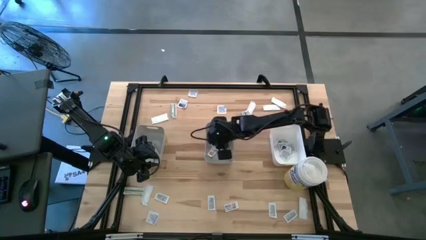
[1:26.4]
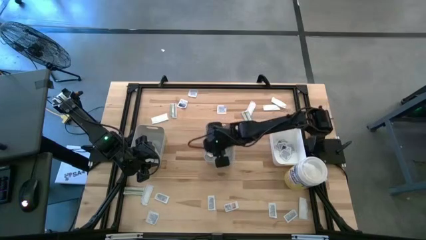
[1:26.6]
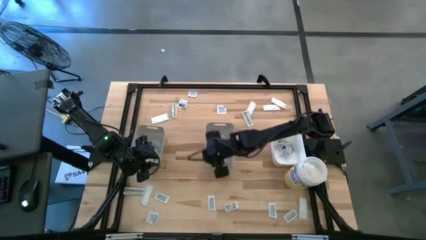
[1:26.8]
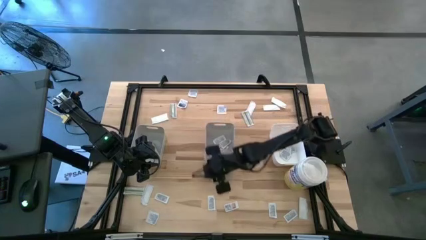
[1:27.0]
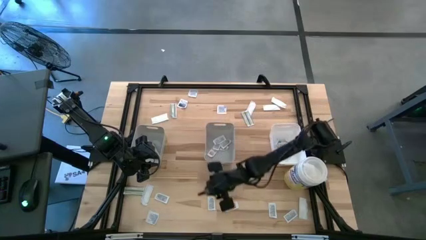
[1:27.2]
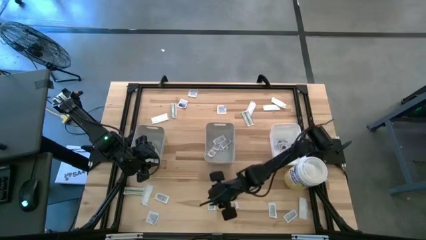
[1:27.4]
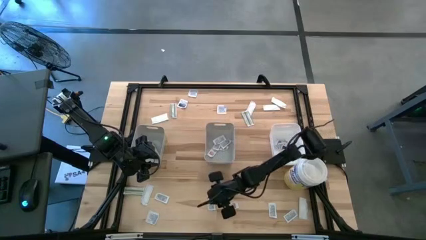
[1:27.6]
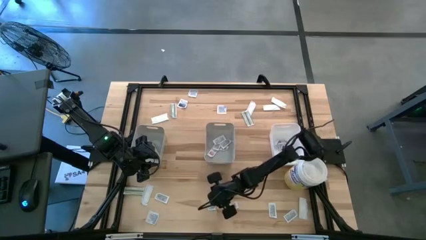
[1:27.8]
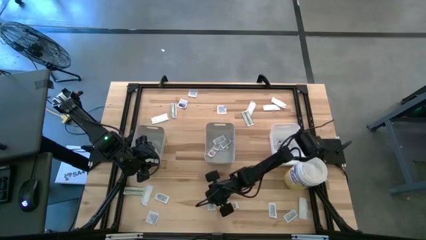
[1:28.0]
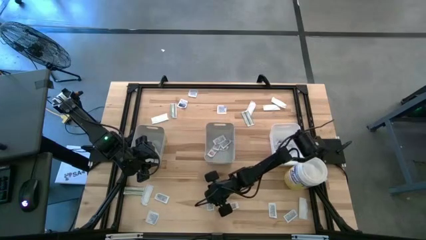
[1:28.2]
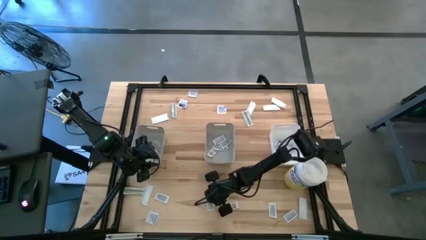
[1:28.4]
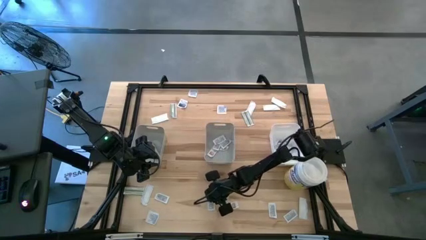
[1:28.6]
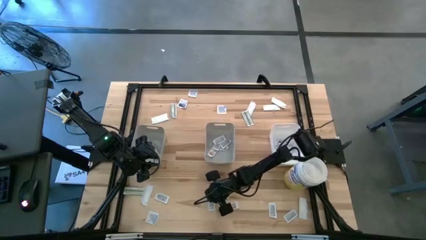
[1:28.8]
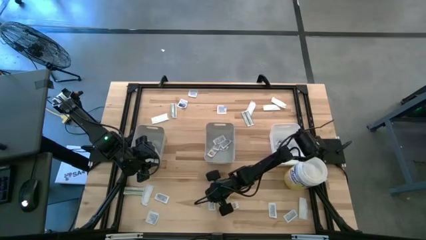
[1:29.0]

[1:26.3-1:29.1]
Task: Pick & Place First Aid Supplies
Put the ointment pack into the right gray bin

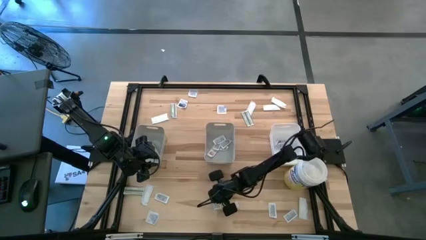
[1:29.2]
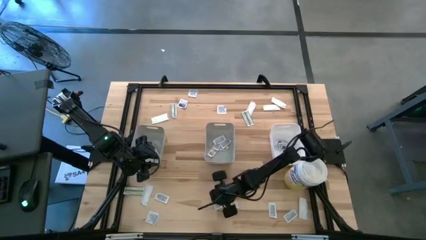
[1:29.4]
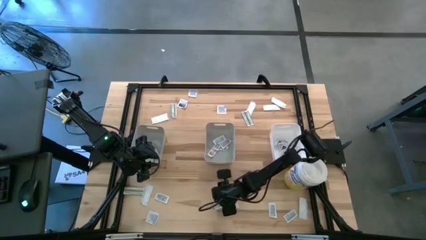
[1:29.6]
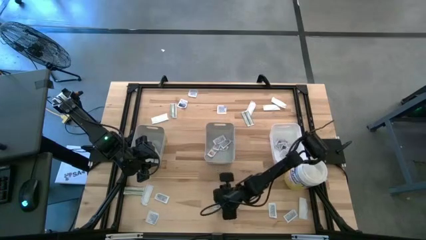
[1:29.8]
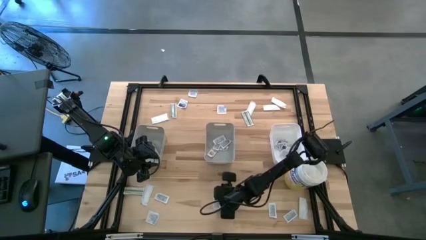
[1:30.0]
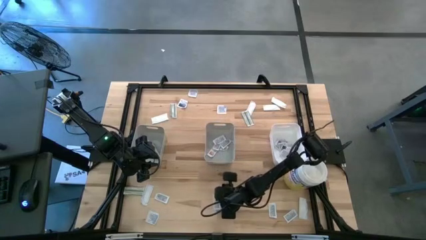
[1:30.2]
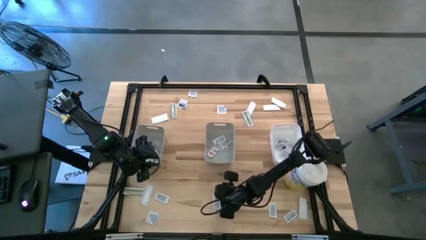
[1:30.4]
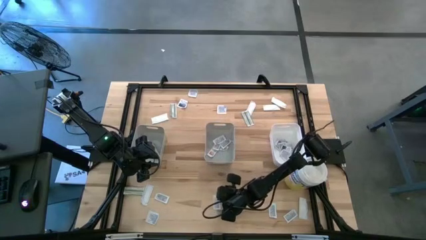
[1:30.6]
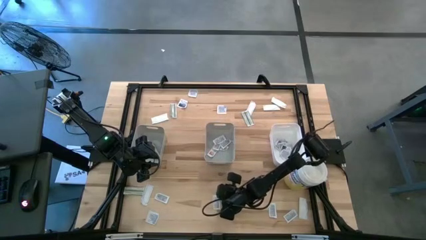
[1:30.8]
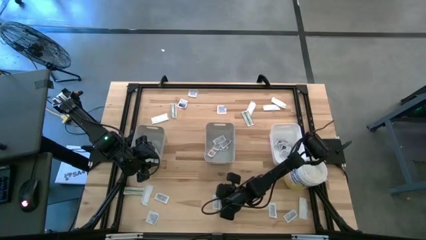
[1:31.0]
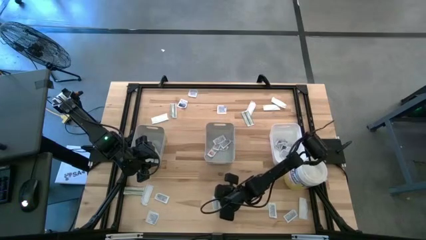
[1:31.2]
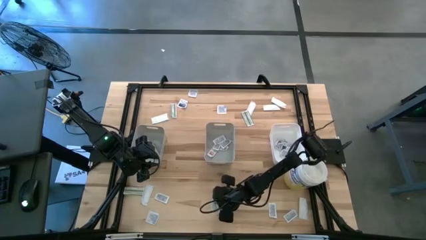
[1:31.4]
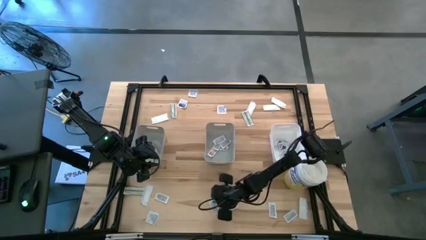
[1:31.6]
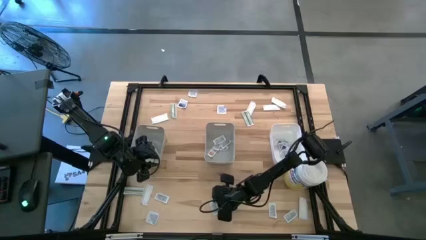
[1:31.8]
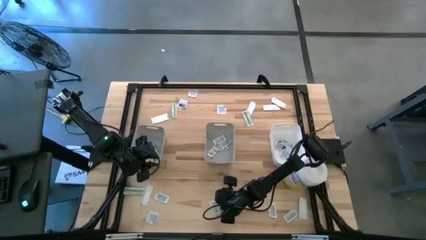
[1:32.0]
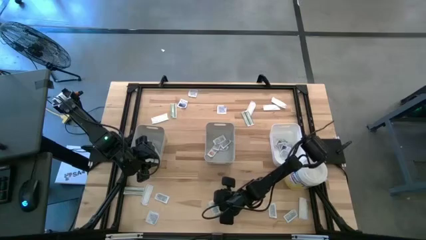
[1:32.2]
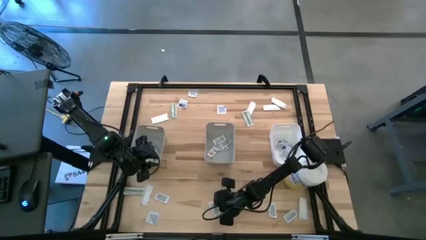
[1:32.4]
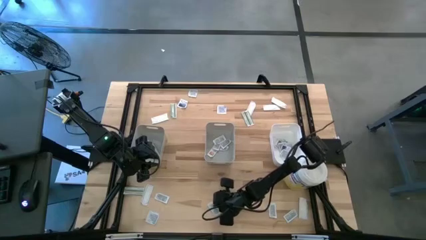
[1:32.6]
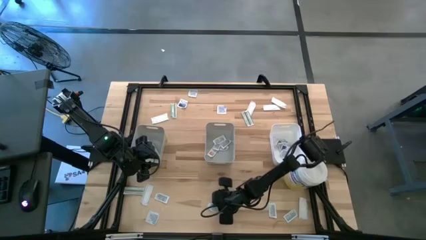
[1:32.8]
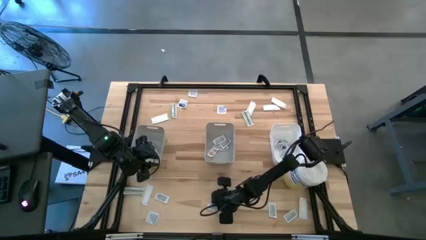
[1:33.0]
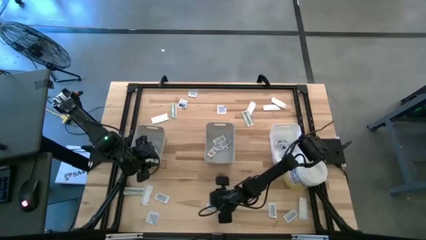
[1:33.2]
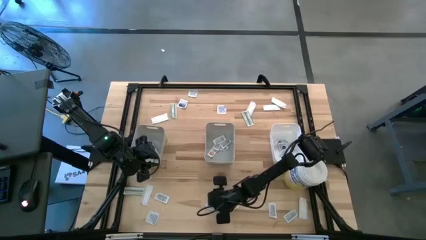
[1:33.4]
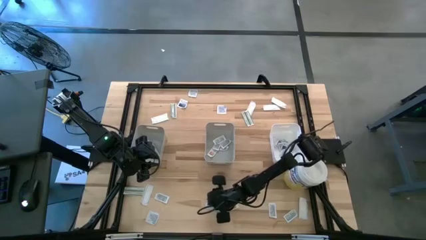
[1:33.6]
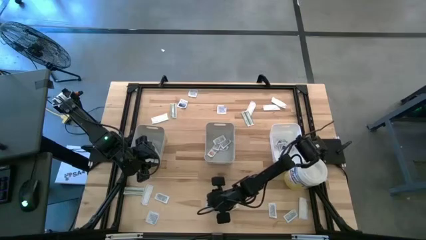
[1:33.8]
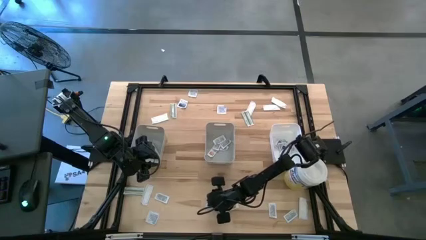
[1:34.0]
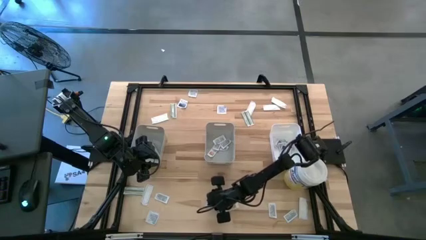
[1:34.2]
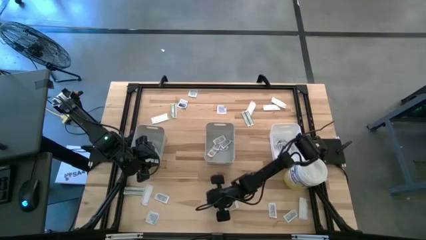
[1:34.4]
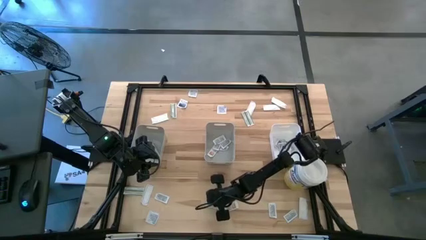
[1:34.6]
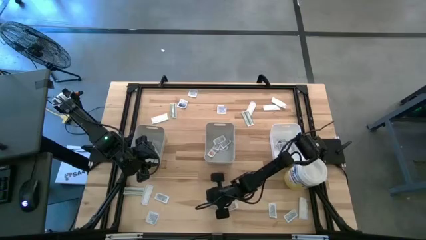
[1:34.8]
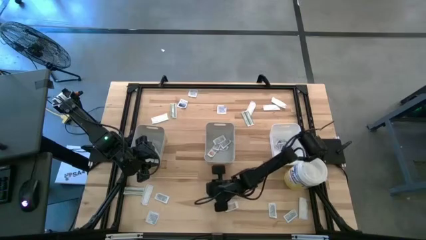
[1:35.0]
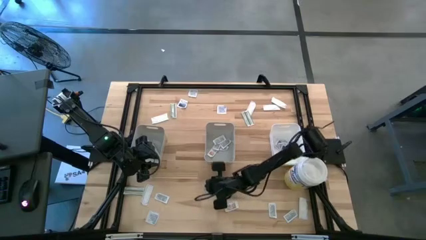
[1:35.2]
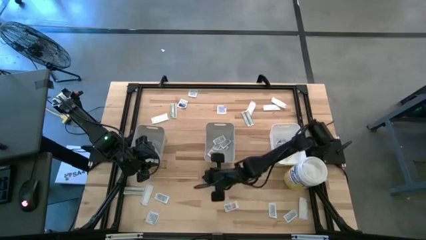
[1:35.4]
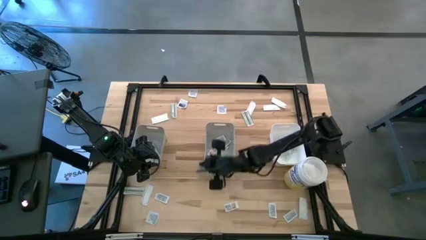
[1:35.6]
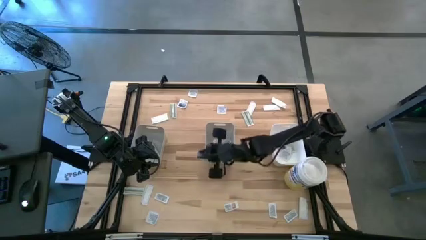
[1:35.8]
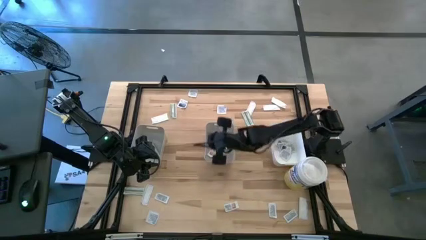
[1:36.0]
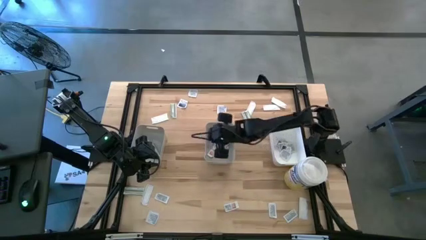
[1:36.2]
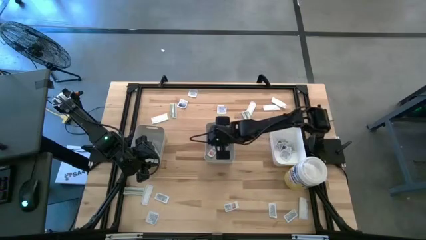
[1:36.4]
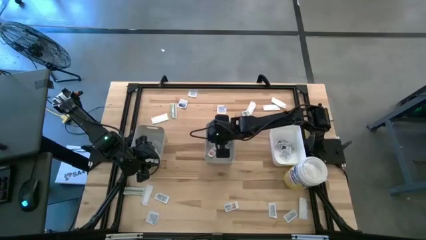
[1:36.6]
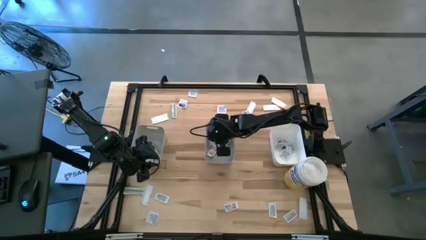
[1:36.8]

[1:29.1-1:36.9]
Put the ointment pack into the right gray bin

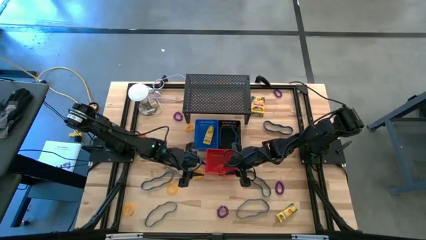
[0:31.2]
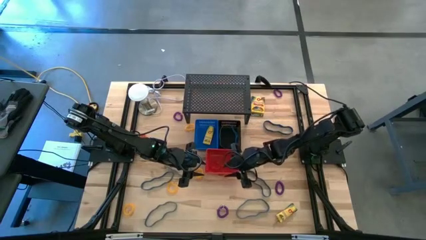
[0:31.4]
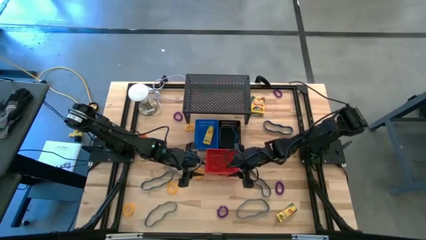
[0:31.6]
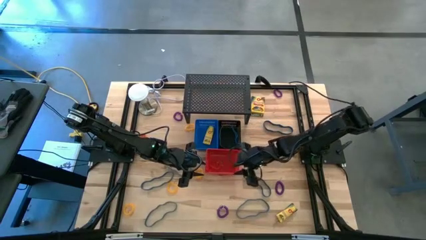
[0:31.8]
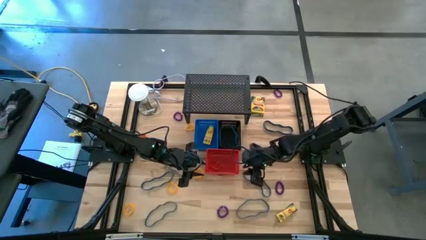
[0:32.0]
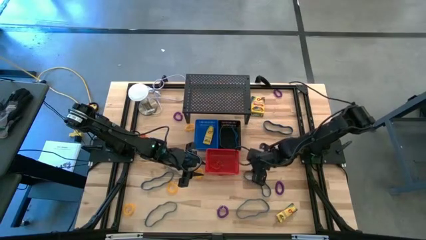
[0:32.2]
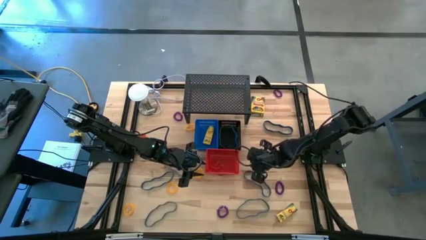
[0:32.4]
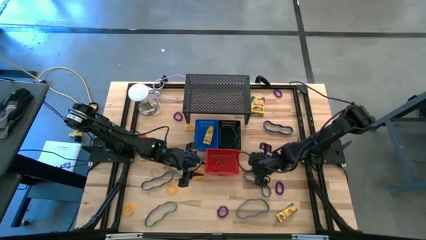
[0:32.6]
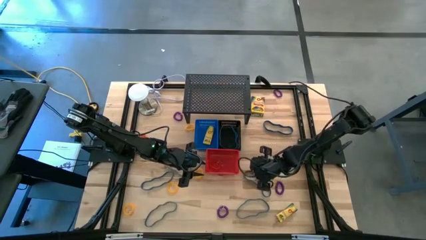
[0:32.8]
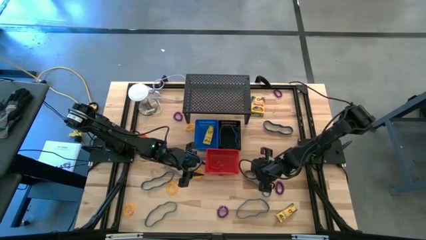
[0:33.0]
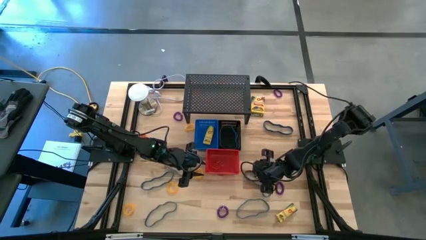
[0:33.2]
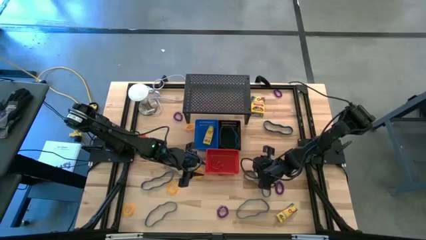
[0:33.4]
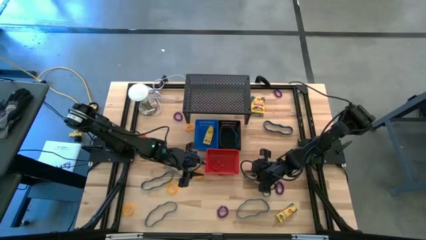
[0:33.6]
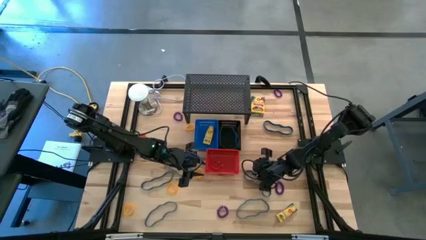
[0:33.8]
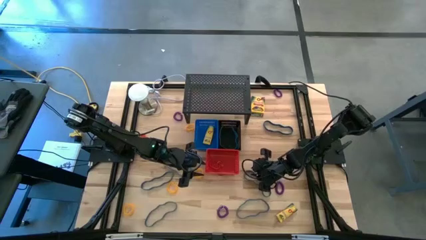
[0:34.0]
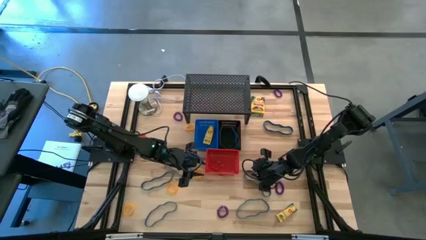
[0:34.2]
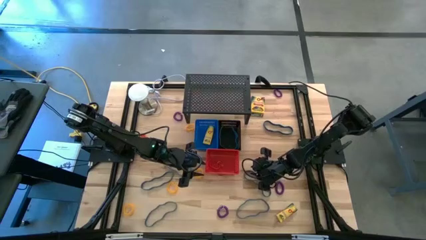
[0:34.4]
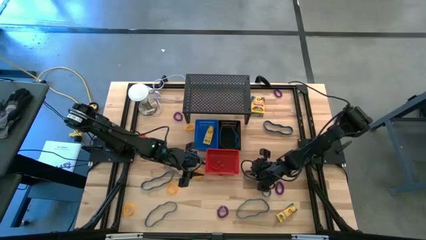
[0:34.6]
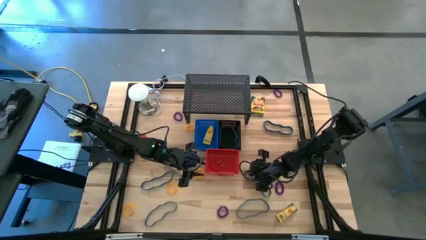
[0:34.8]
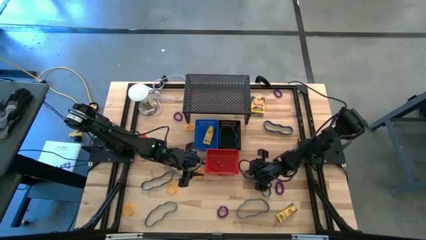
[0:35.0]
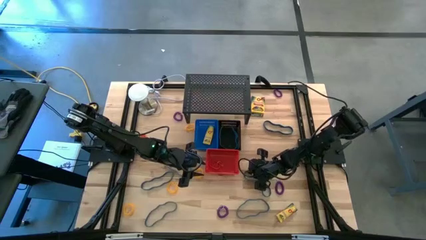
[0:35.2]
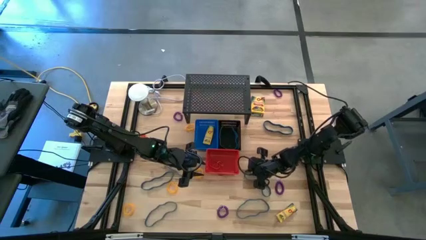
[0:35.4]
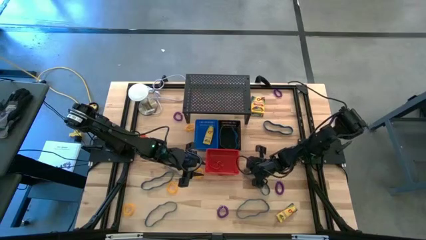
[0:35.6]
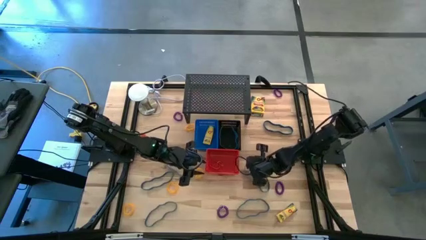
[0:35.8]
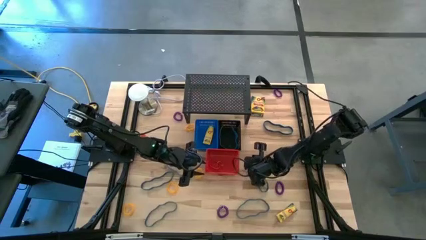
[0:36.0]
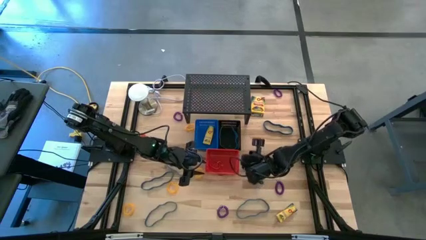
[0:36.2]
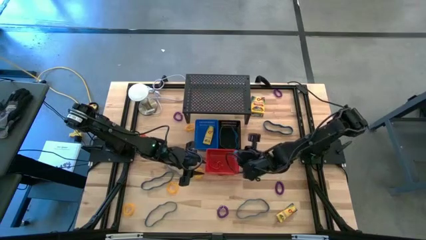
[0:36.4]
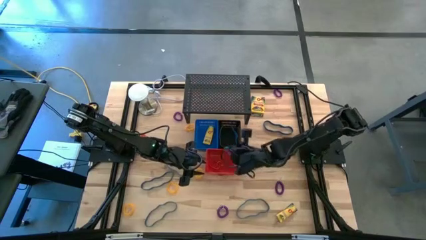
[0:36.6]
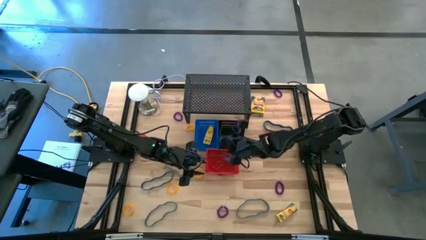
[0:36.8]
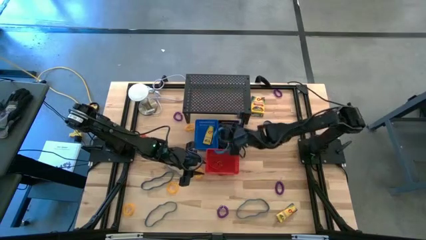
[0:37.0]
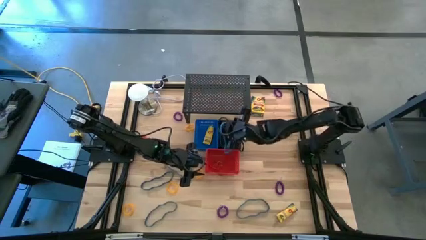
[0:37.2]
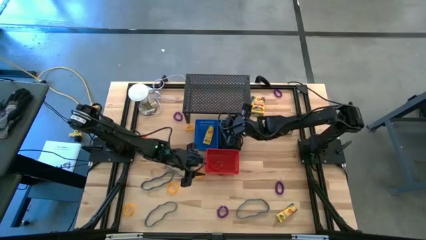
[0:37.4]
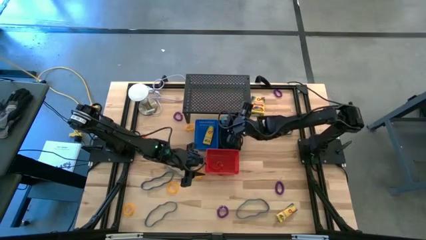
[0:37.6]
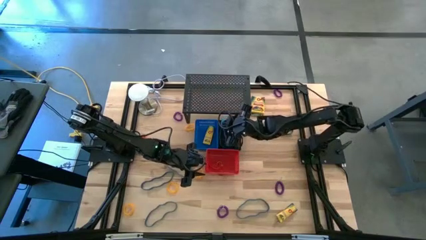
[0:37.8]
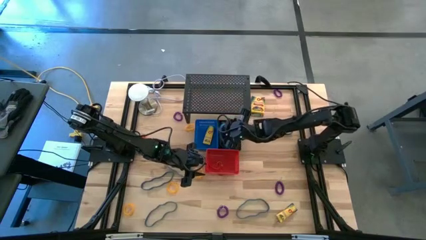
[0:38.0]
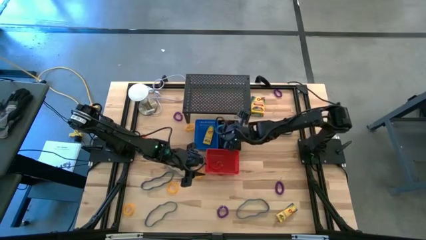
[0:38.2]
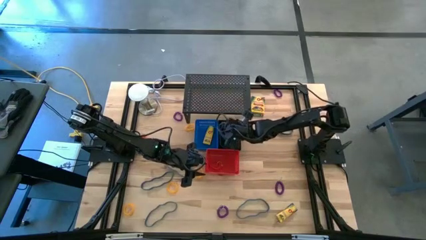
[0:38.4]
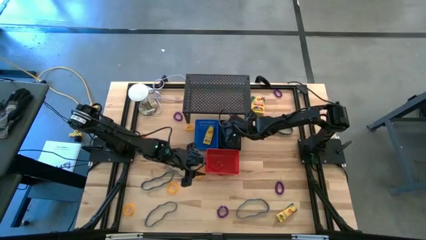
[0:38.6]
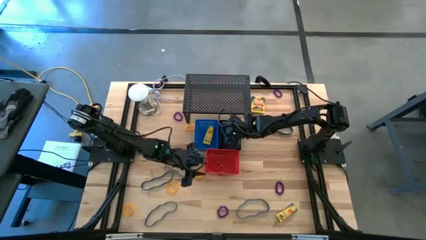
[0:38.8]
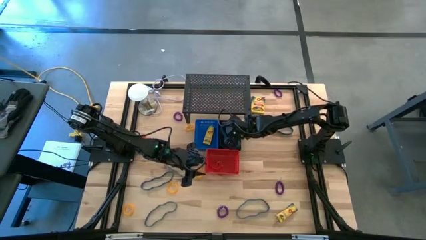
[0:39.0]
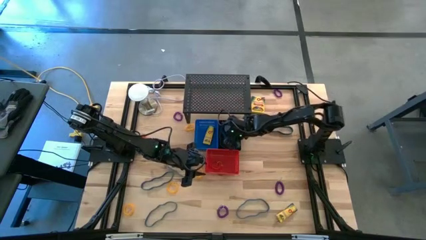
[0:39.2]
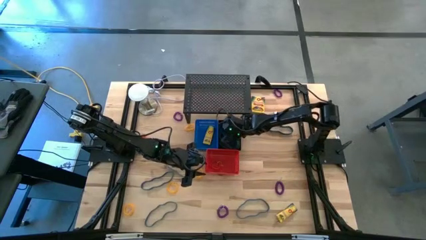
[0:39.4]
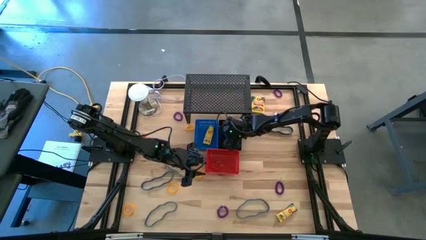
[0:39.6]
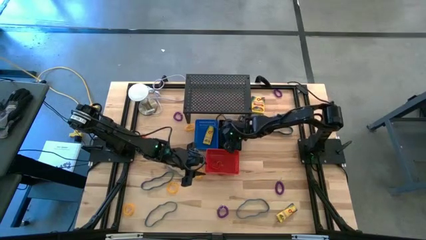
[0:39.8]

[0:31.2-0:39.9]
Task: Pick & Place Office Desk Supplies
Put the blue rubber band into the black bin
